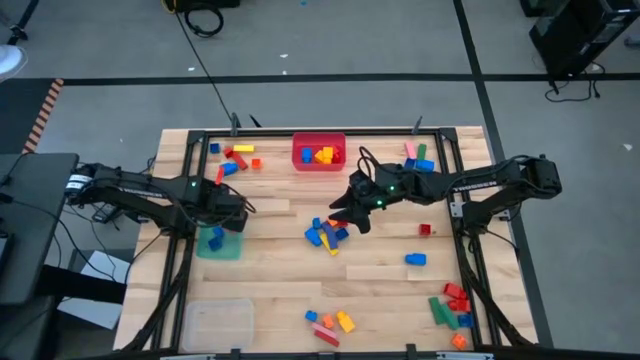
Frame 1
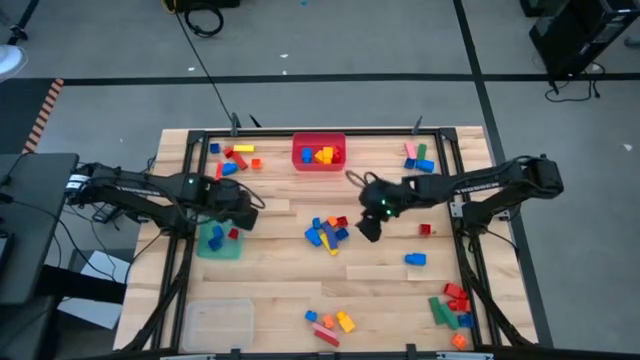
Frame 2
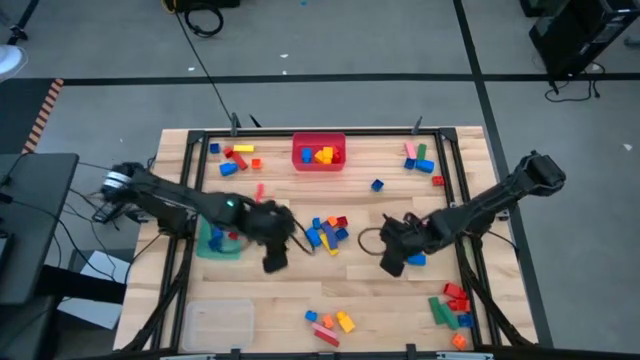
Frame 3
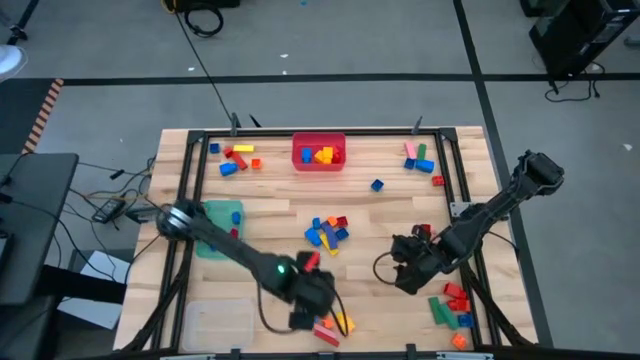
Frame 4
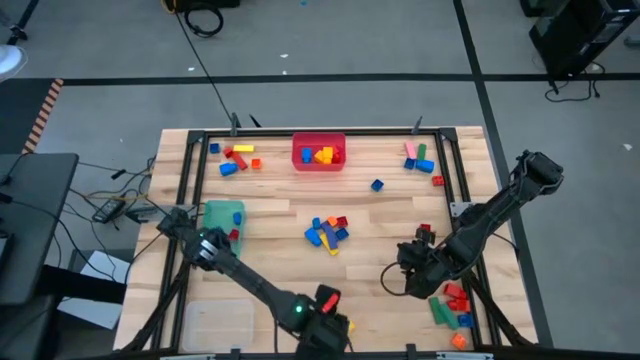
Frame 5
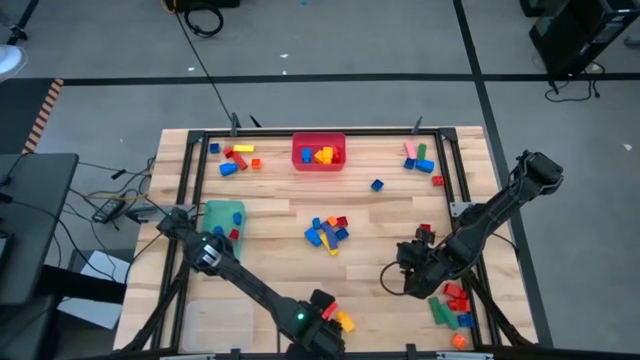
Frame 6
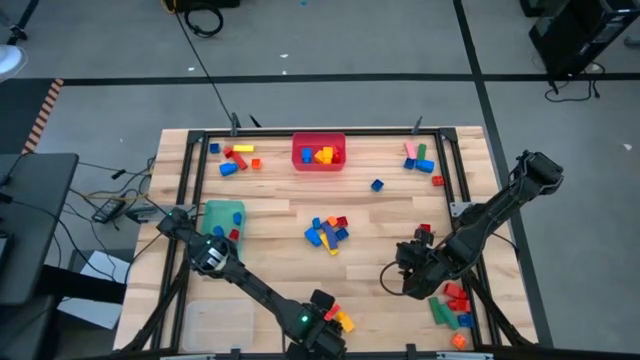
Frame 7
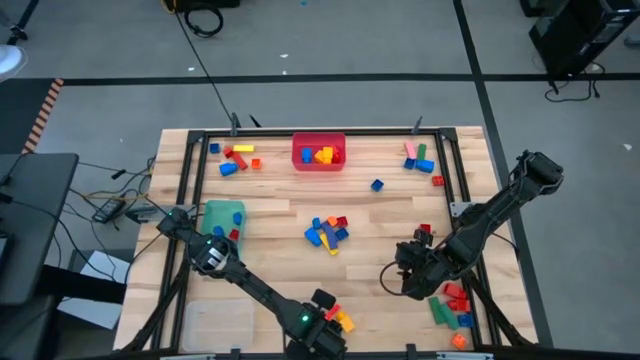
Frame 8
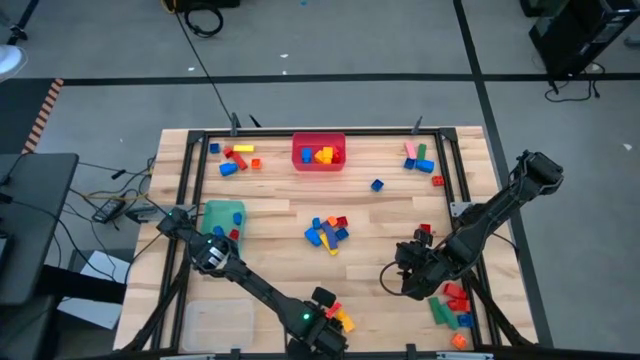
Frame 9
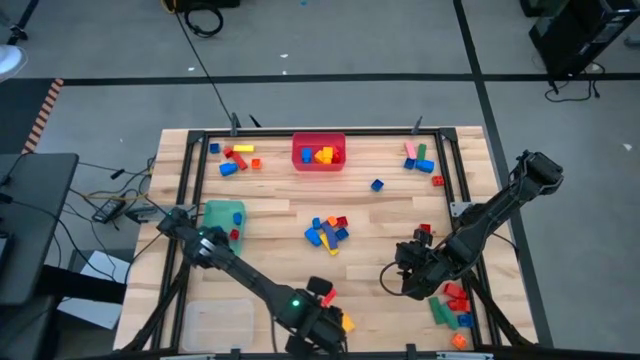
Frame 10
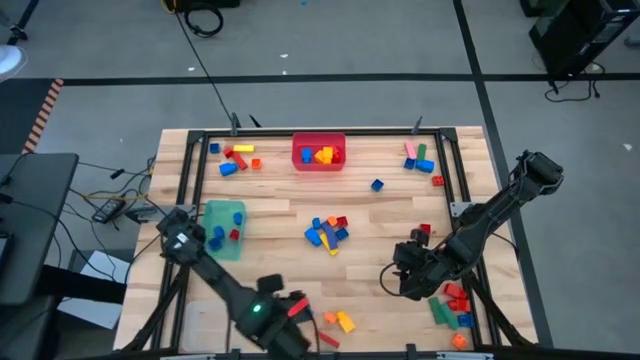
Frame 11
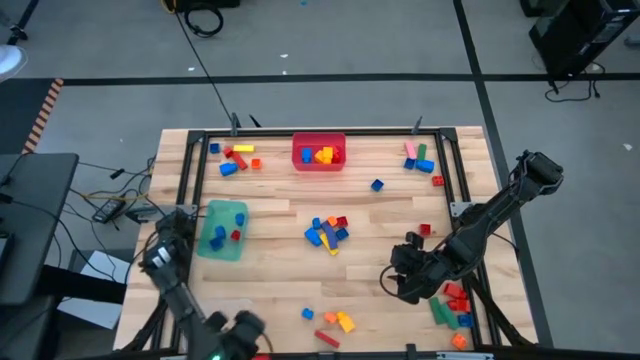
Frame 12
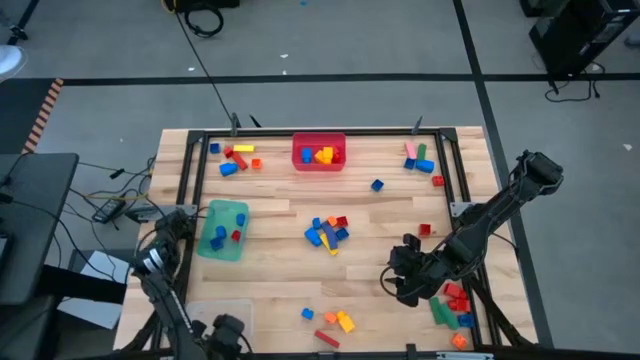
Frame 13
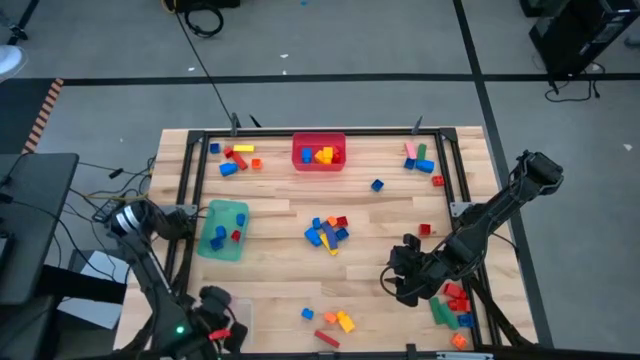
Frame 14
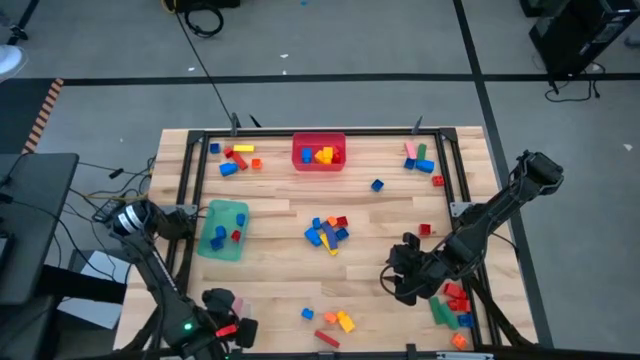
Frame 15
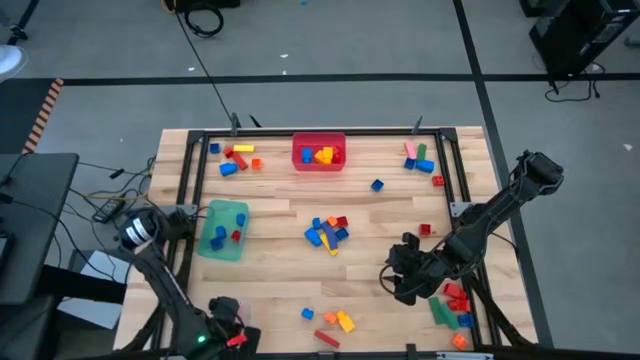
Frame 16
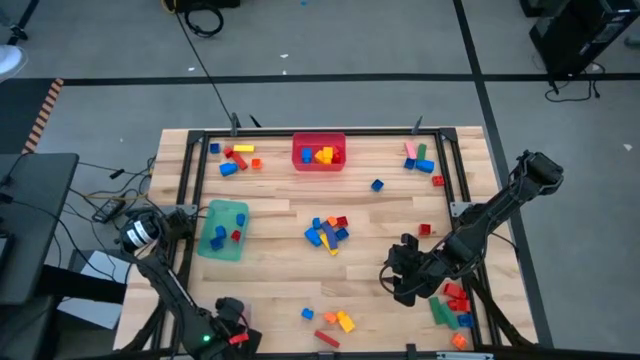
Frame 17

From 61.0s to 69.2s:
Task: Sort blocks by size
Put the pink rectangle block into the transparent bin

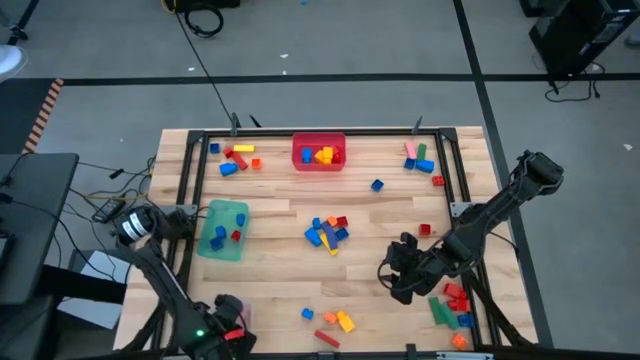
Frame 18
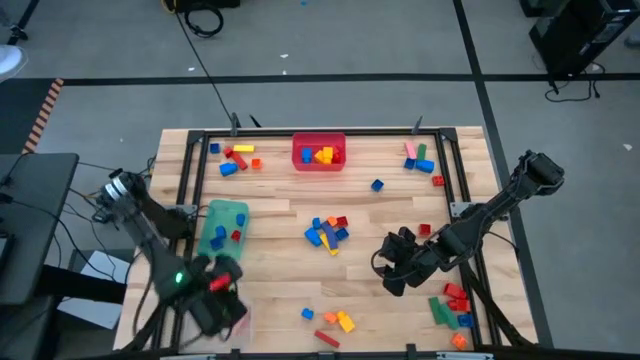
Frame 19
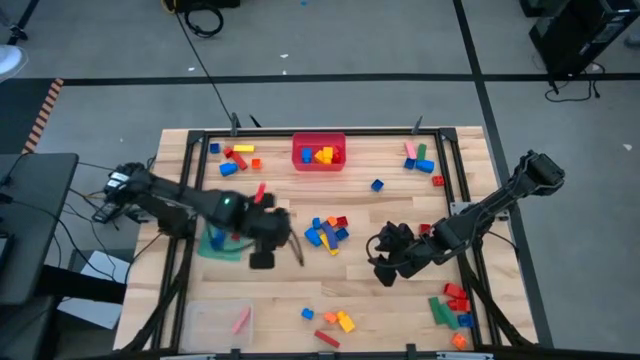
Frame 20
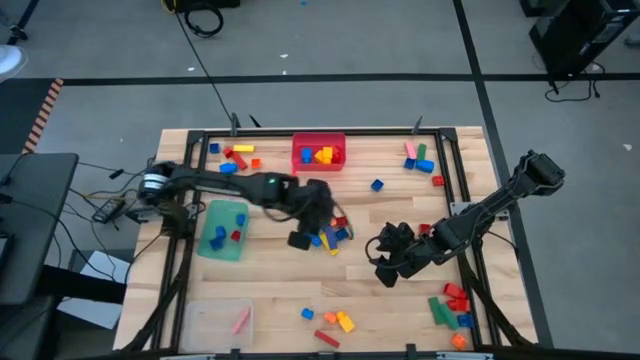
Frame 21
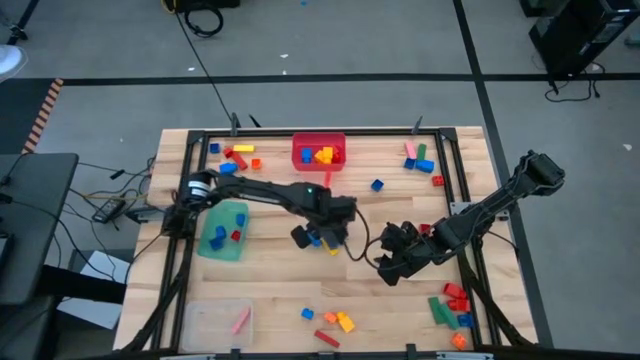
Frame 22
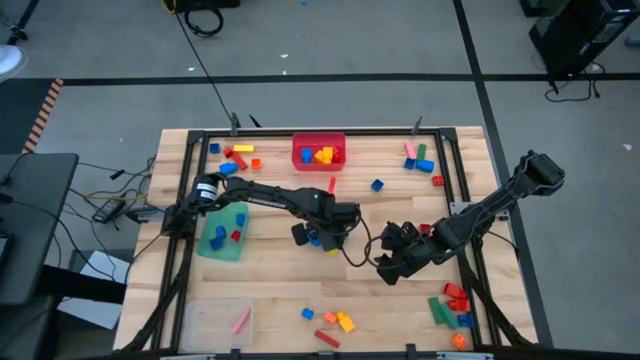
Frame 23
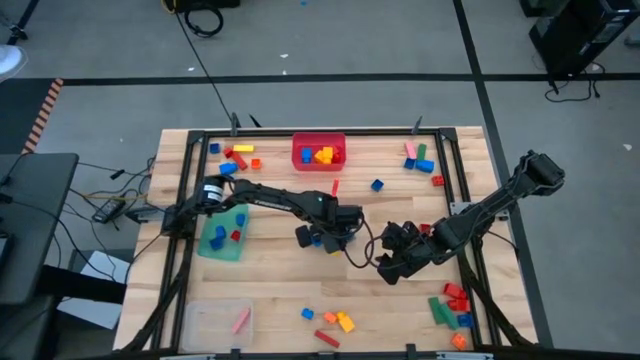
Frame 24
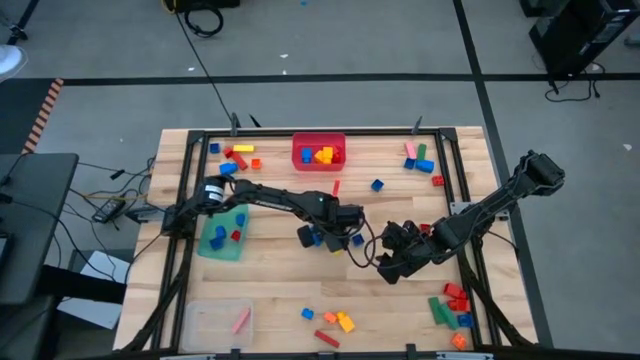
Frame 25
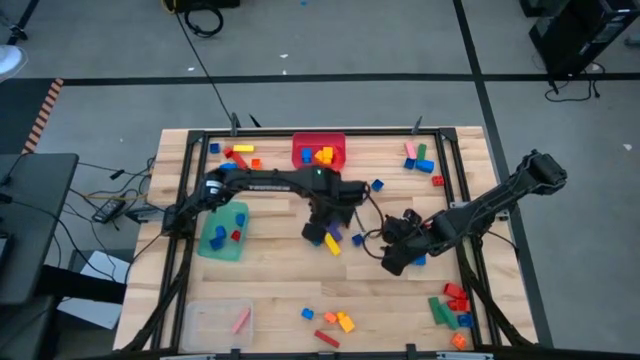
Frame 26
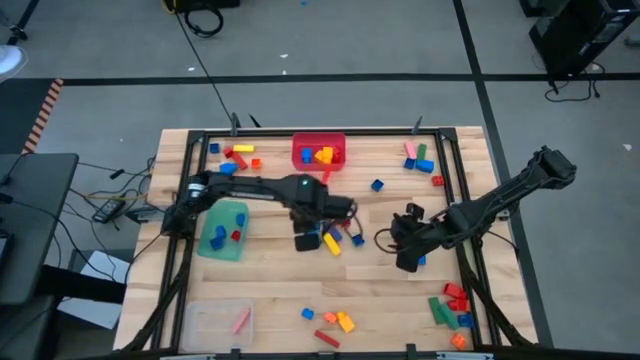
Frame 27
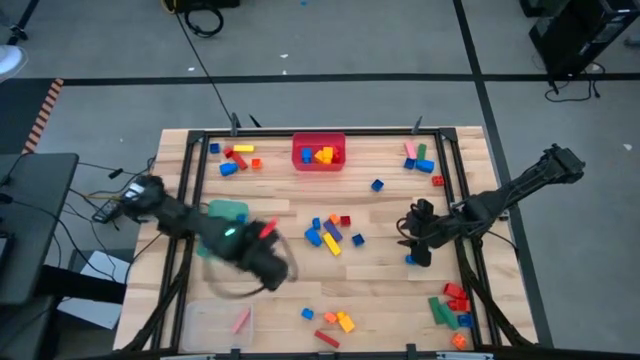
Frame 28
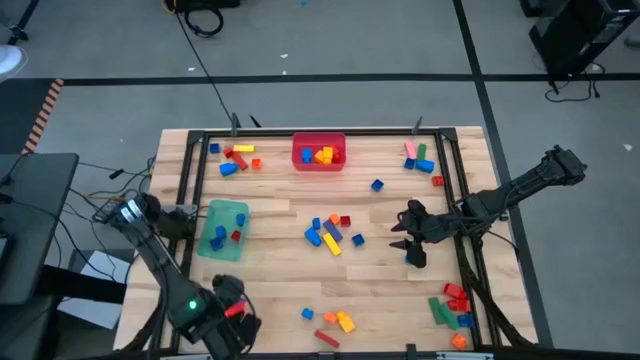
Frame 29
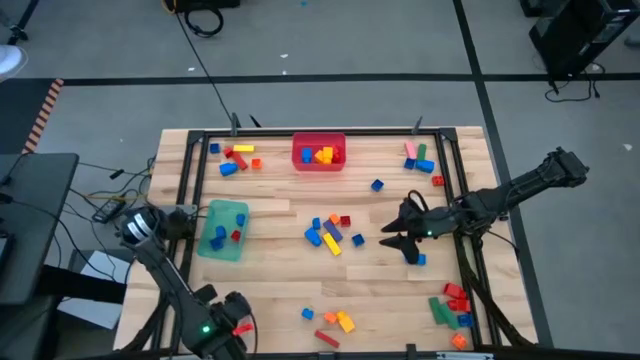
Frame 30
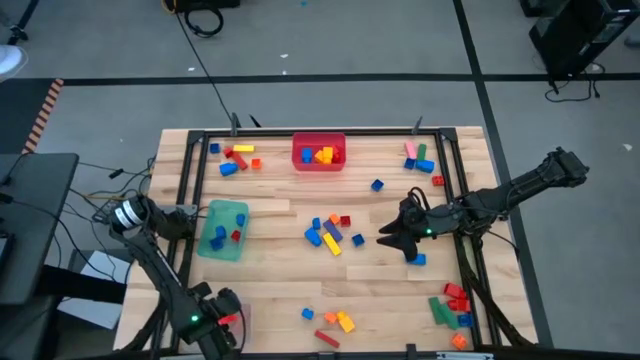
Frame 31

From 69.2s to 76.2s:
Put the blue rectangle block into the transparent bin

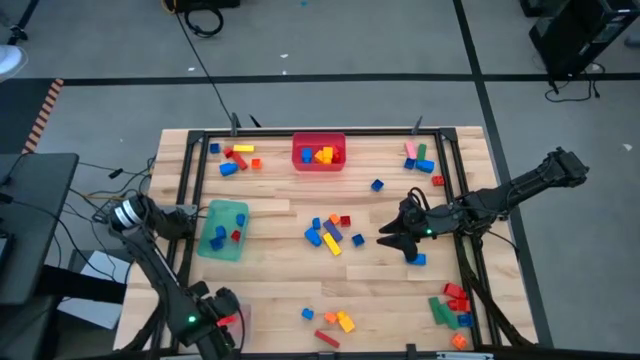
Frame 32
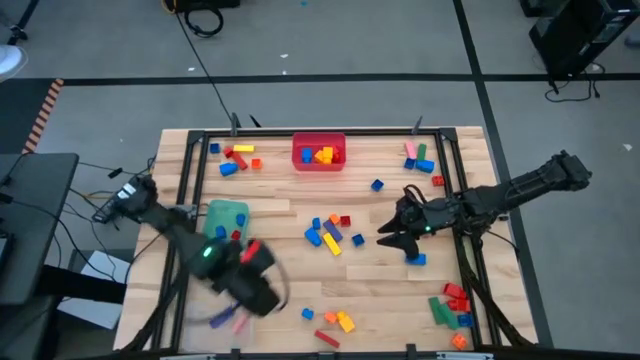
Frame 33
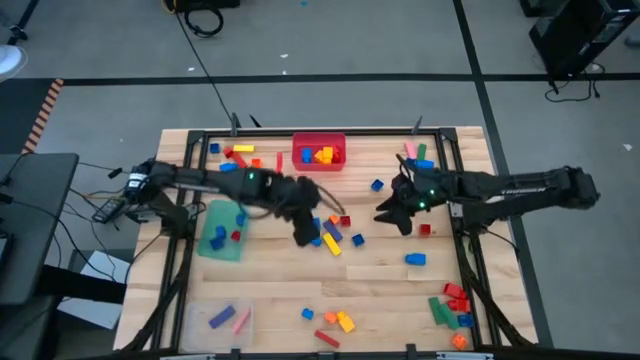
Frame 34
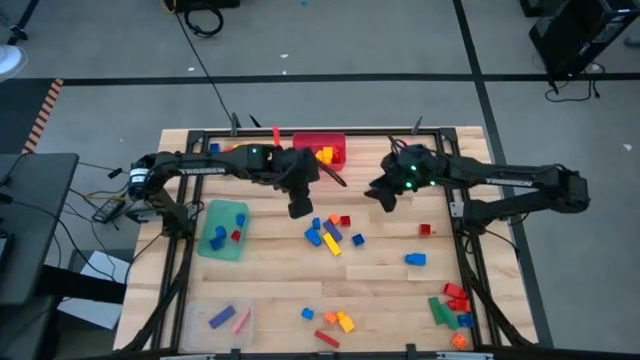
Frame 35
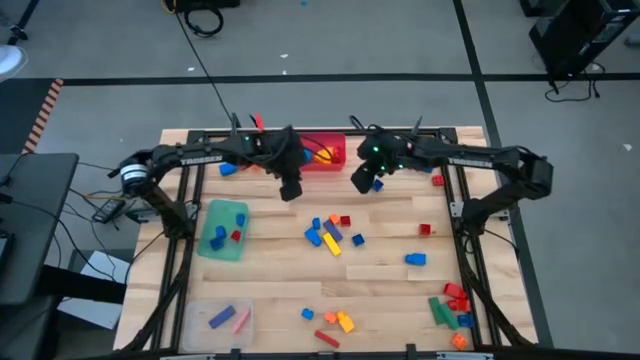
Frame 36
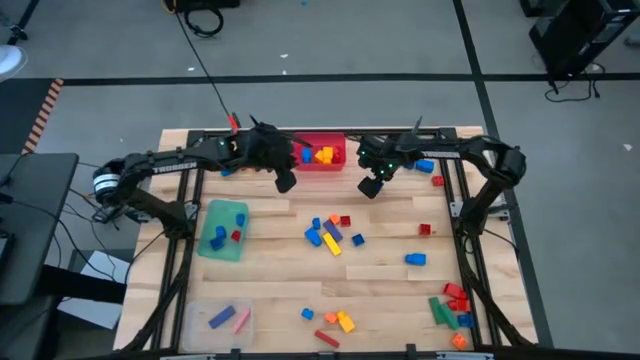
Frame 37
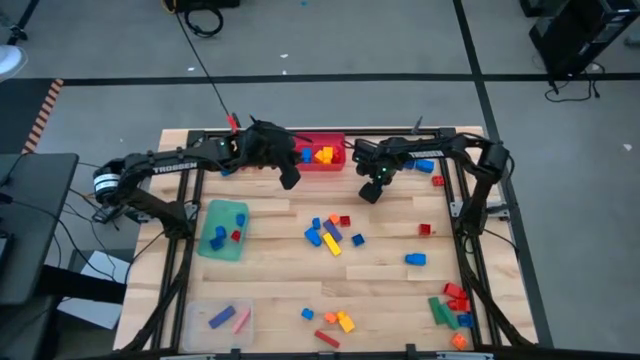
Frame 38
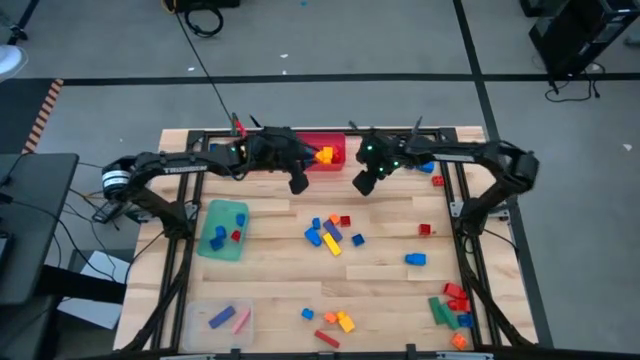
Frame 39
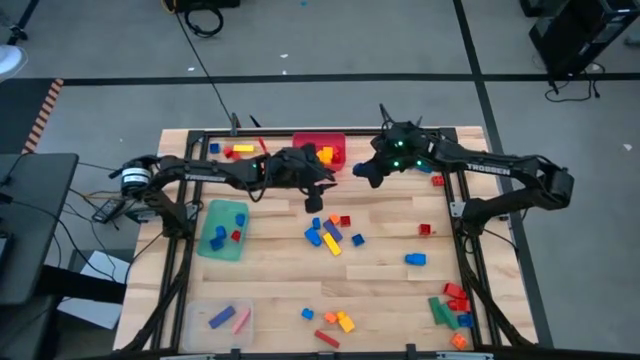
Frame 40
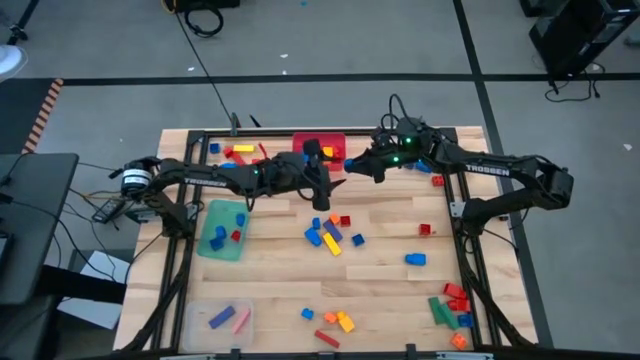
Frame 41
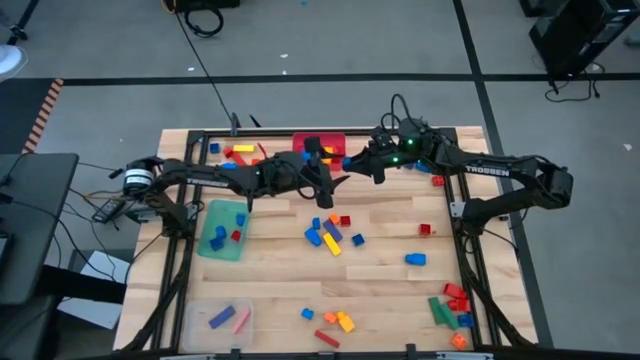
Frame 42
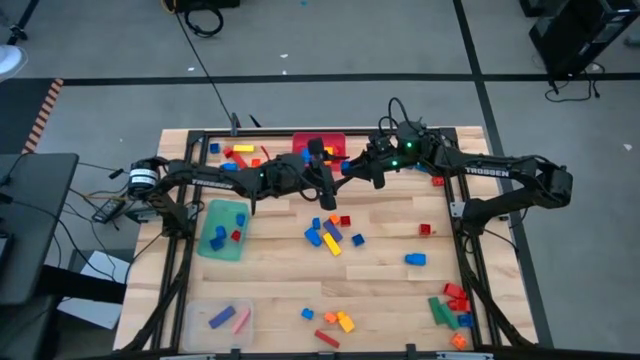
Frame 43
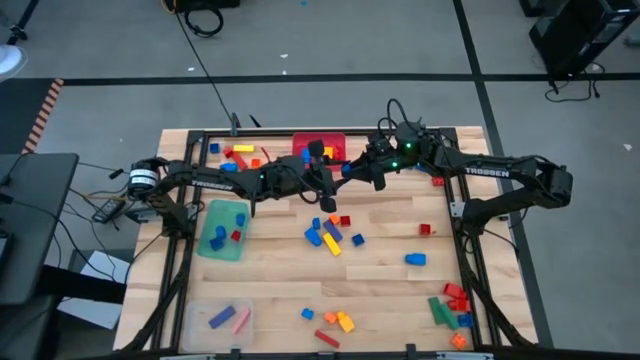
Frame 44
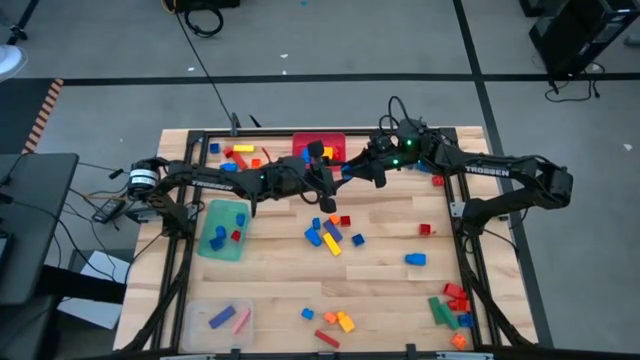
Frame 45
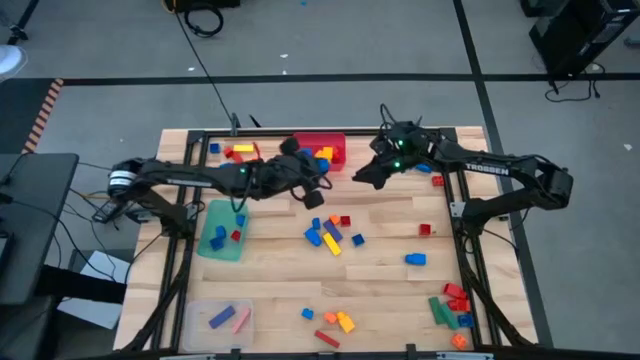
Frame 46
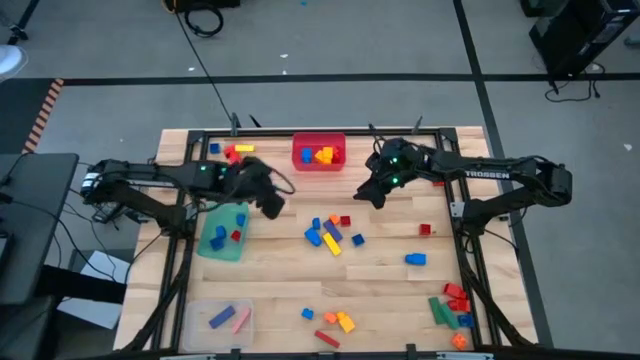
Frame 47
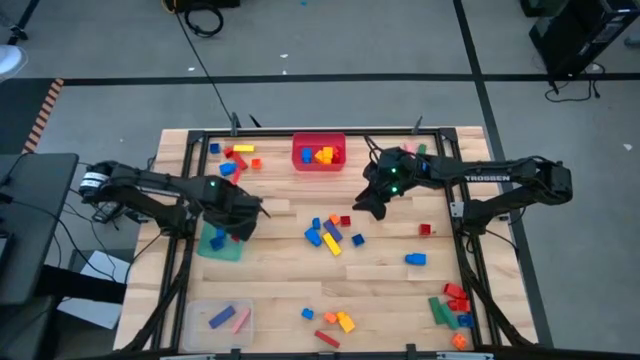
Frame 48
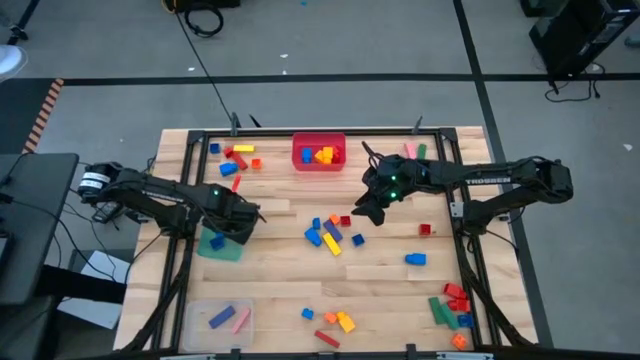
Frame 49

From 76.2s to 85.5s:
Put the blue 4 studded building block into the teal bin
